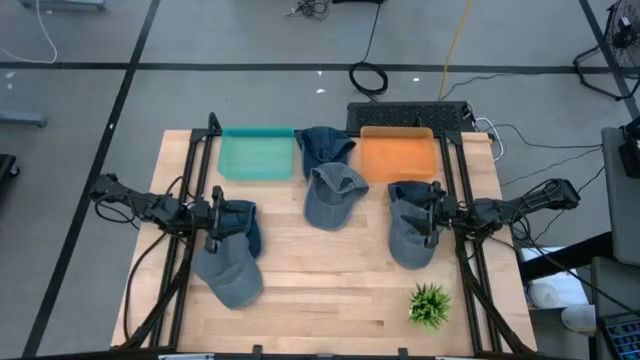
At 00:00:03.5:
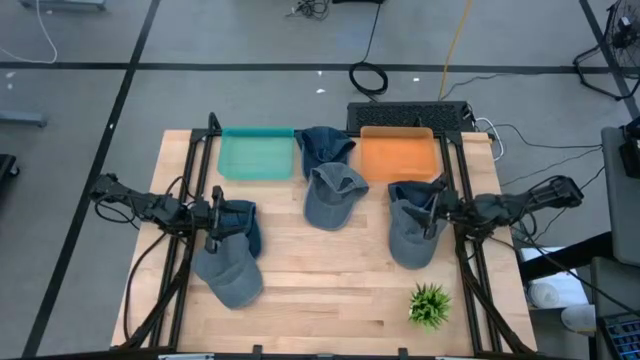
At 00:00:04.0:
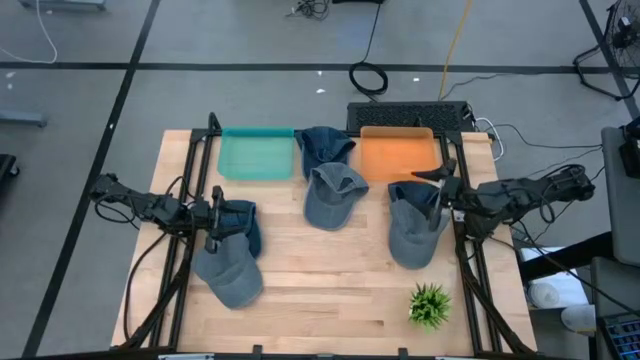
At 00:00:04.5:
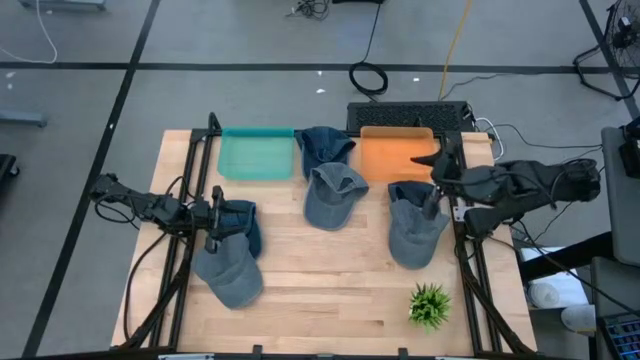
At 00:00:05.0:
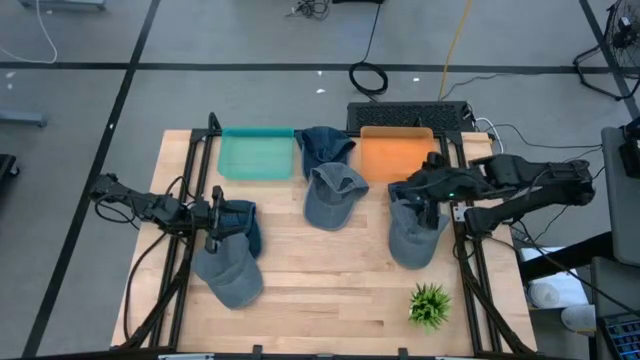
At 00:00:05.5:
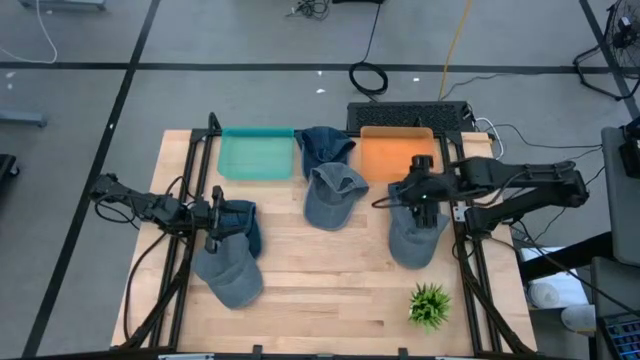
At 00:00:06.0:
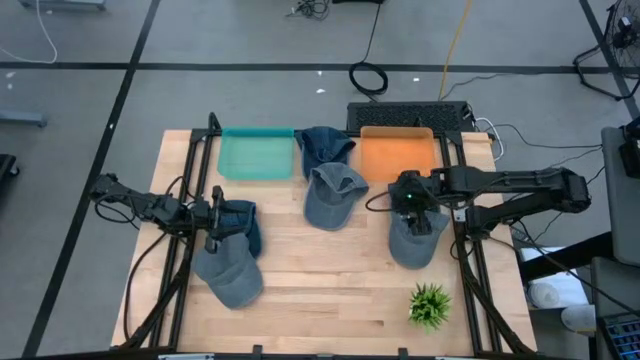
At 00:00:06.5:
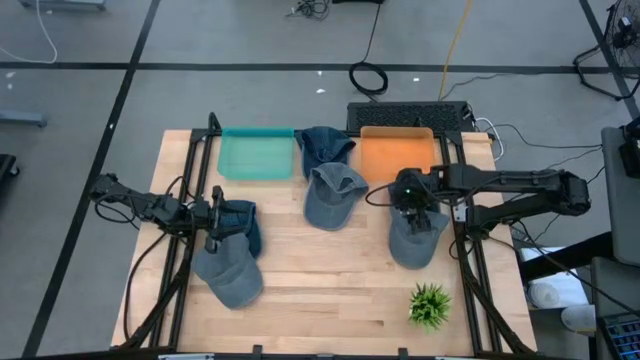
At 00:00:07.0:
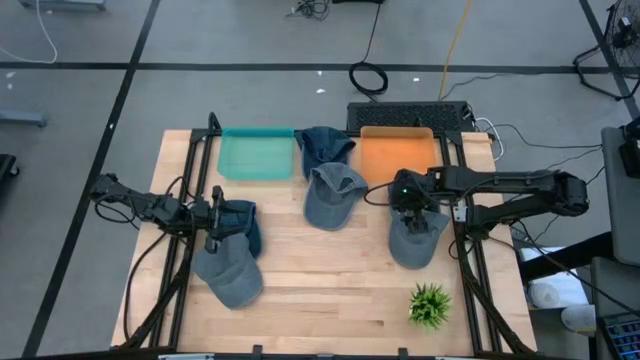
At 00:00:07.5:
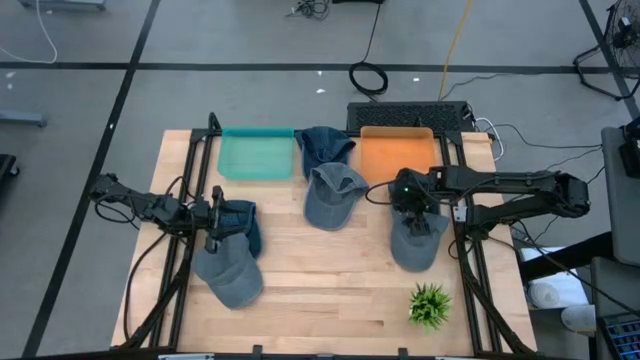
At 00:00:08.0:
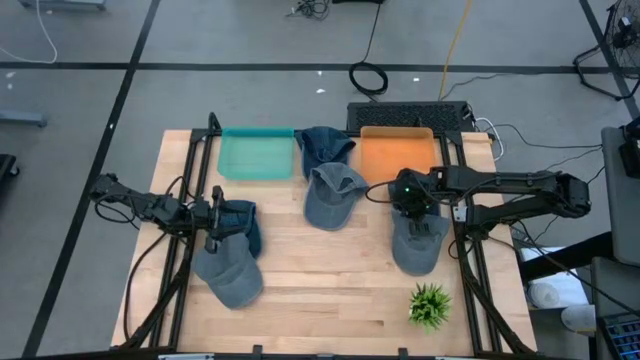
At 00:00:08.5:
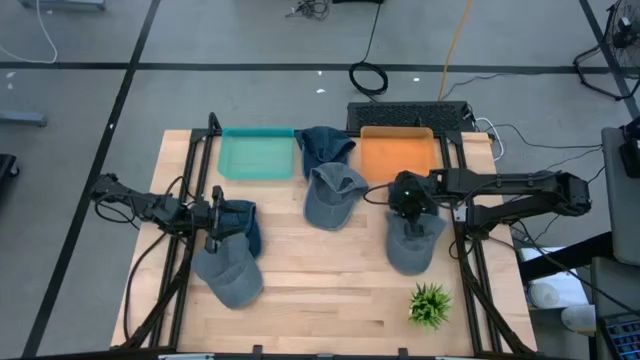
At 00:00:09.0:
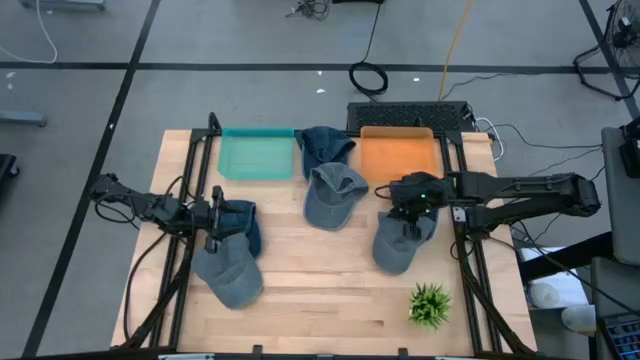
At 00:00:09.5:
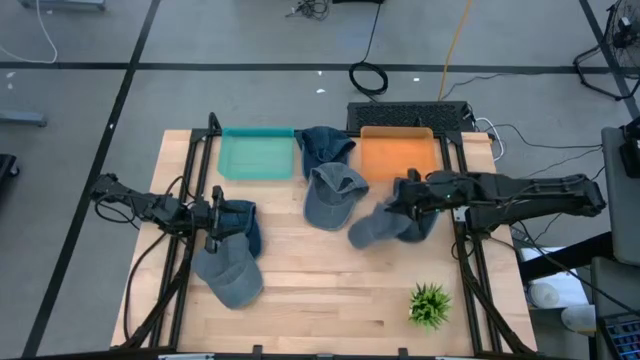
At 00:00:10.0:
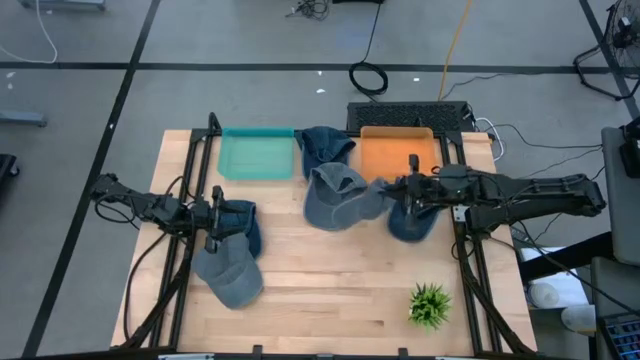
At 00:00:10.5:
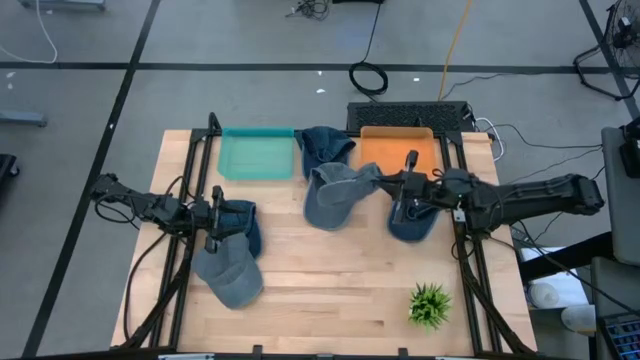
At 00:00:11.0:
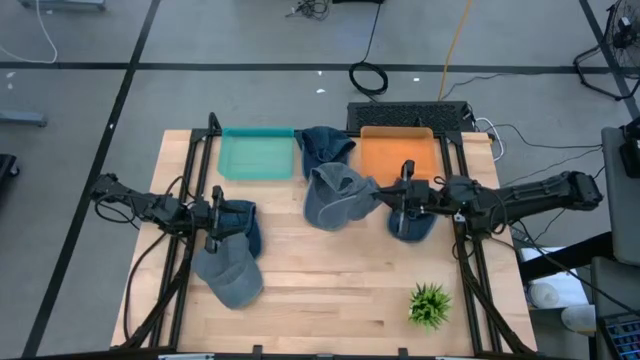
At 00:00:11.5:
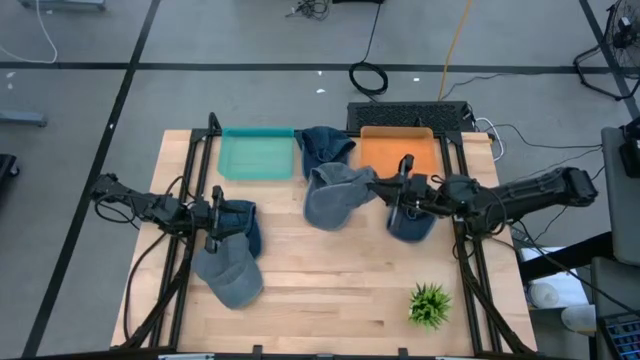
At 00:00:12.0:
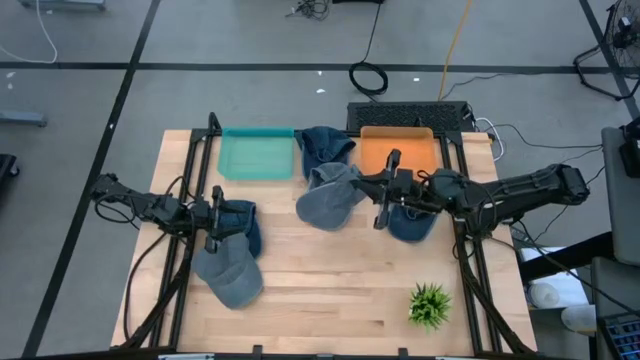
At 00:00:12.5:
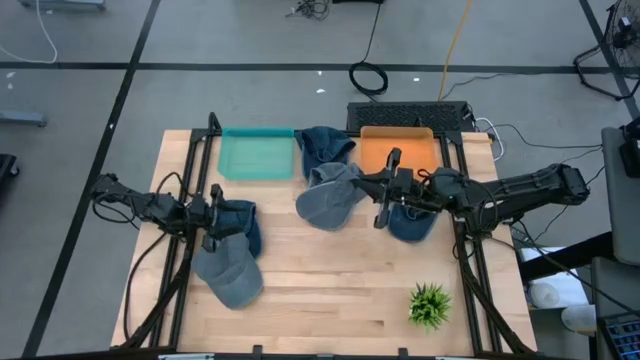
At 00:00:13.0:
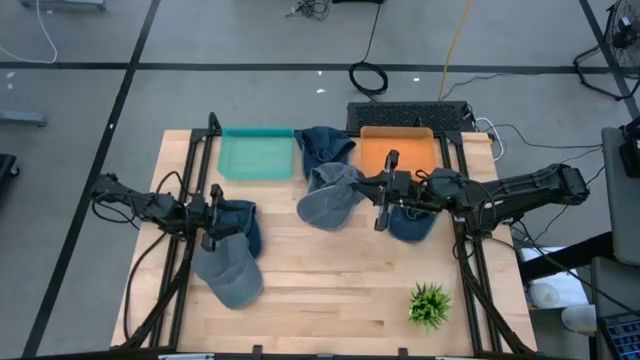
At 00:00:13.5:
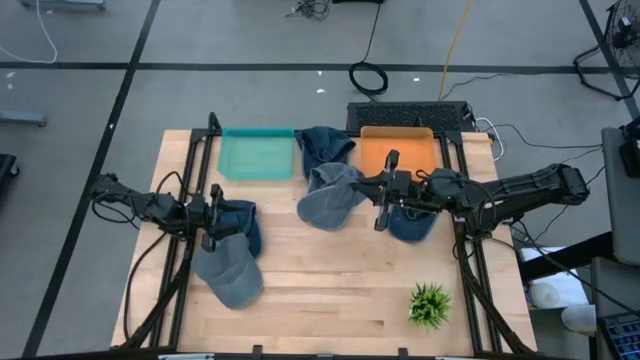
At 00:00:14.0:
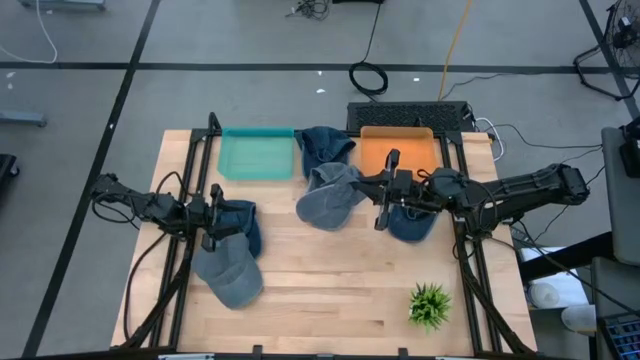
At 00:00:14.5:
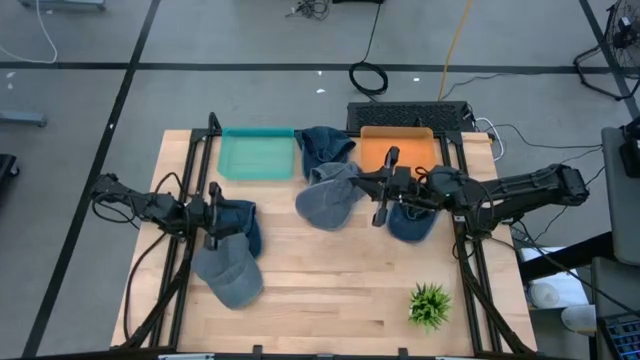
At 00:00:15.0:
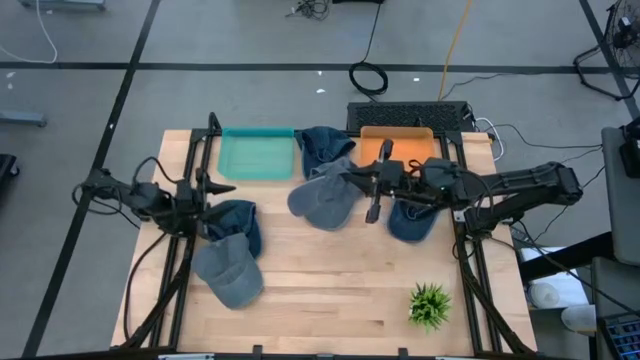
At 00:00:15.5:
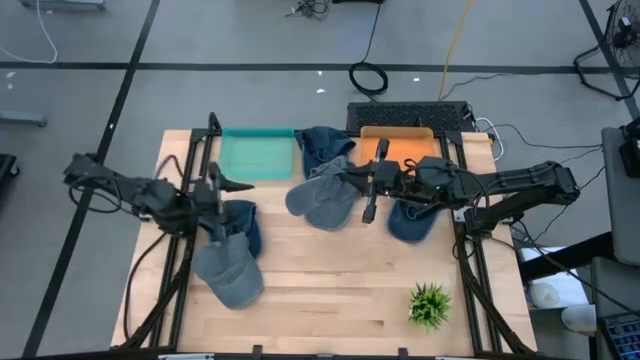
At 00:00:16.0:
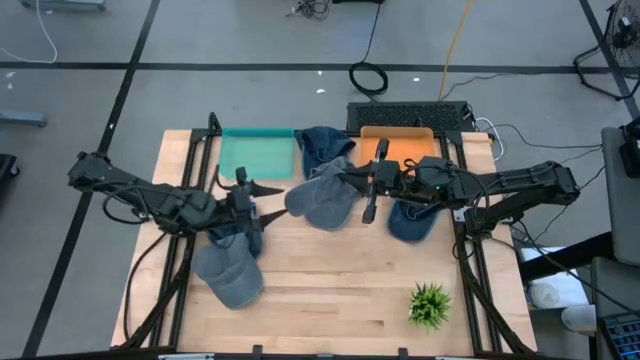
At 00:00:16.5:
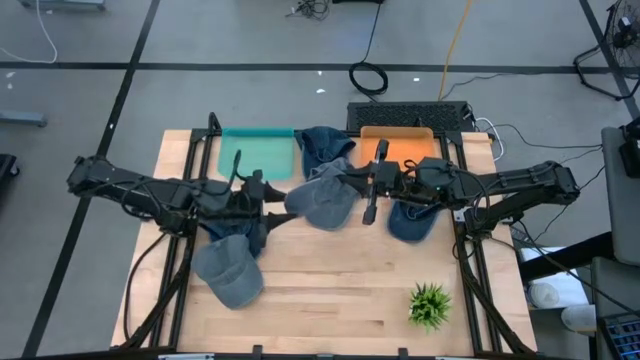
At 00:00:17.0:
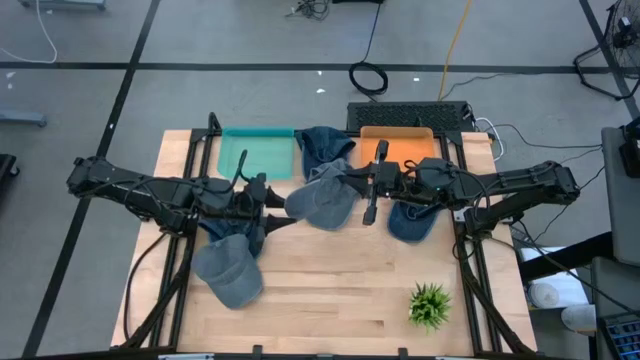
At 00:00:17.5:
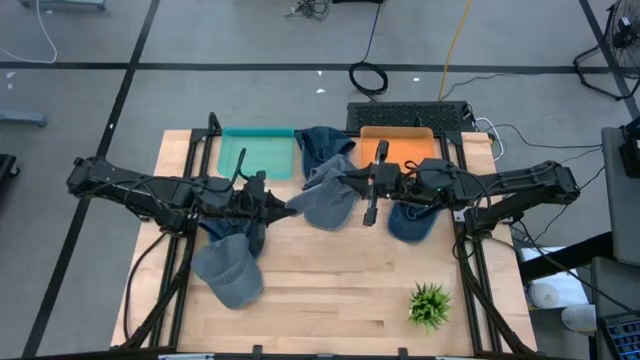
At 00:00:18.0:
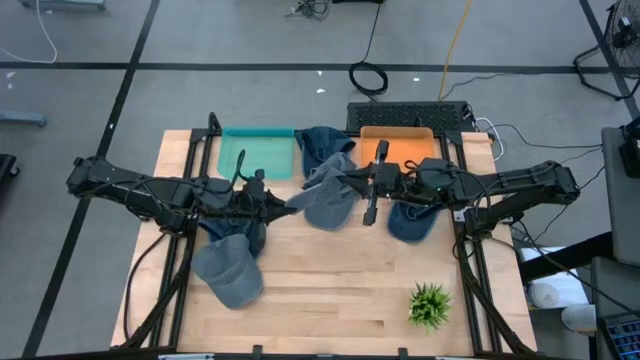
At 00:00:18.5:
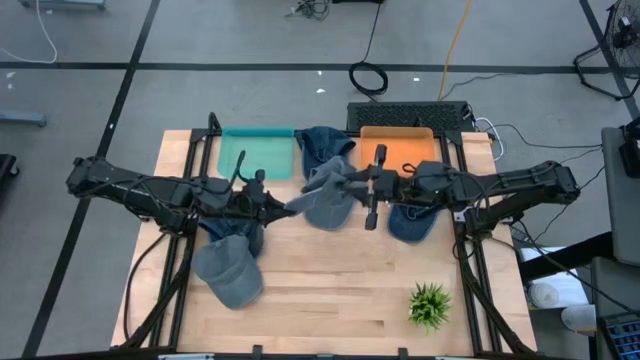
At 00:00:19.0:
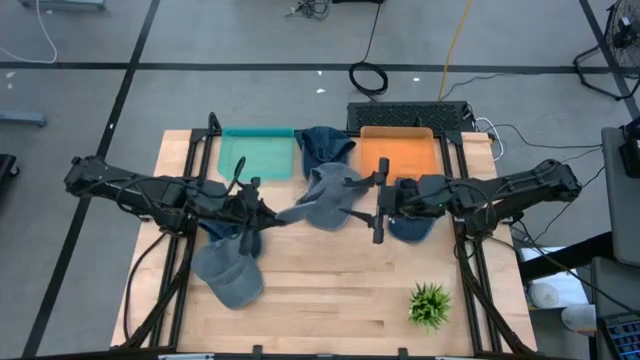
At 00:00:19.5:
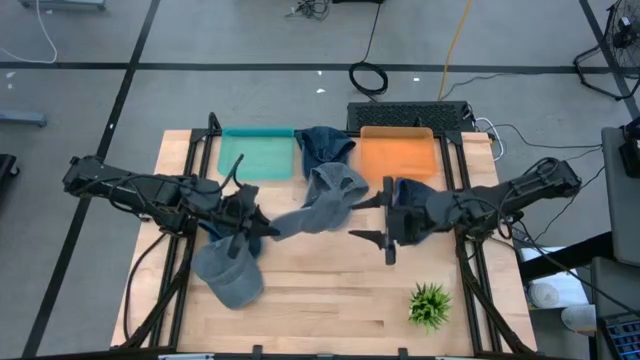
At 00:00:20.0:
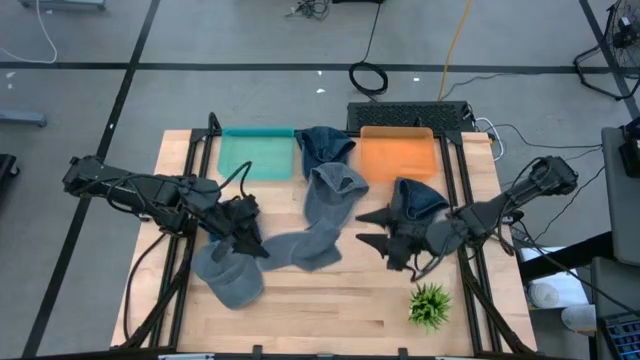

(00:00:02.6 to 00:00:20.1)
Task: Pick & Place hat
Put the top right gray cap into the orange bin
